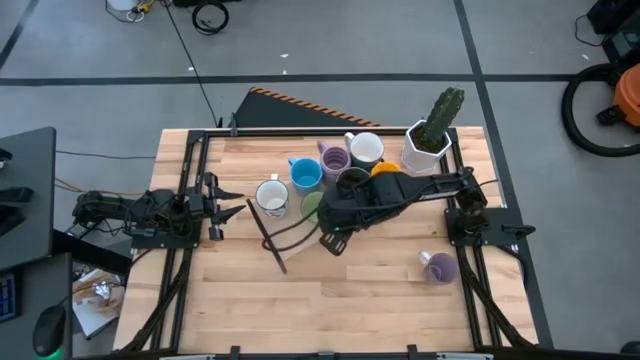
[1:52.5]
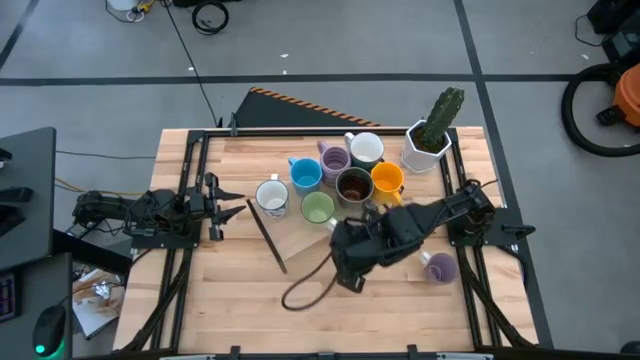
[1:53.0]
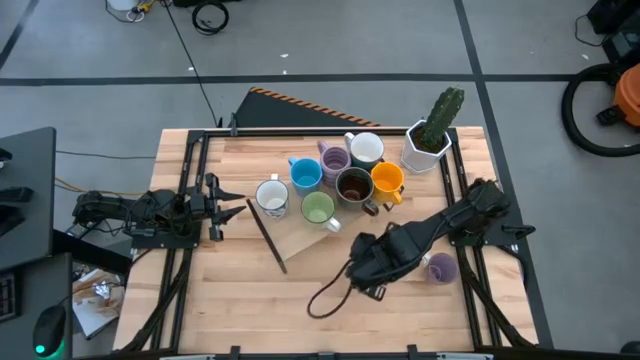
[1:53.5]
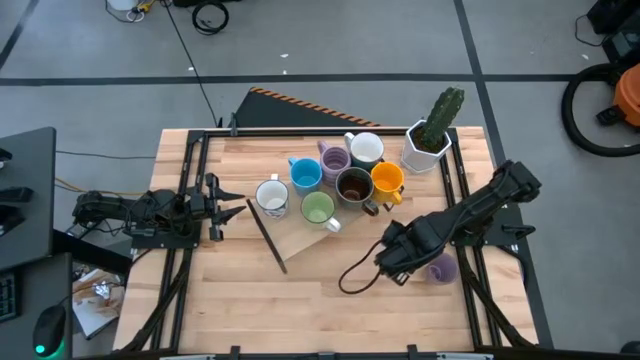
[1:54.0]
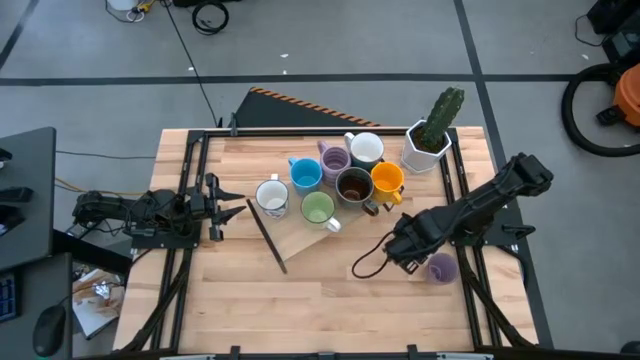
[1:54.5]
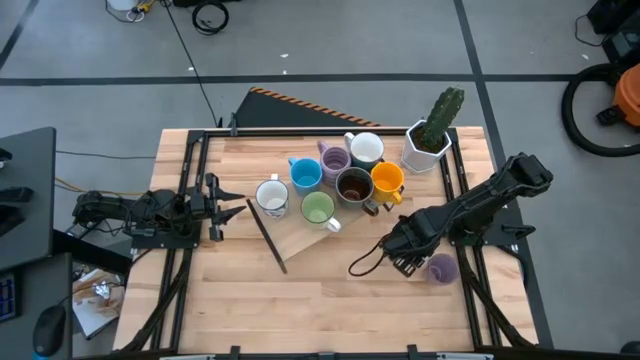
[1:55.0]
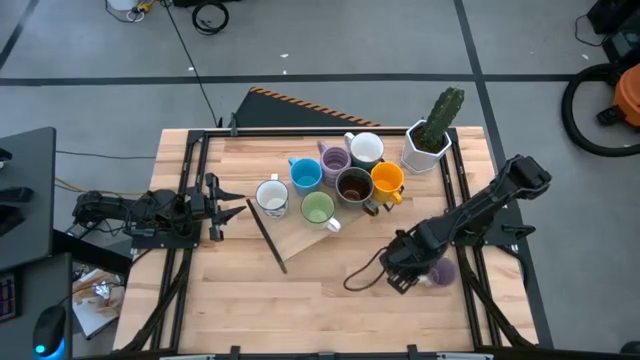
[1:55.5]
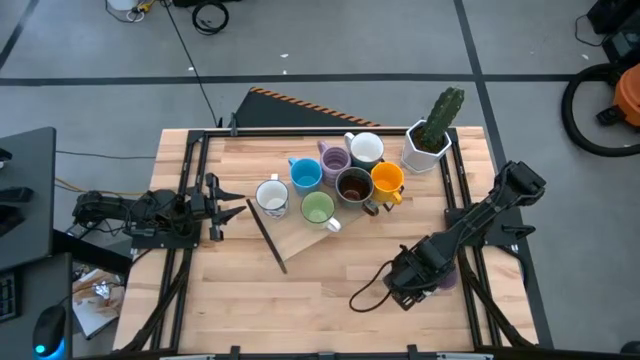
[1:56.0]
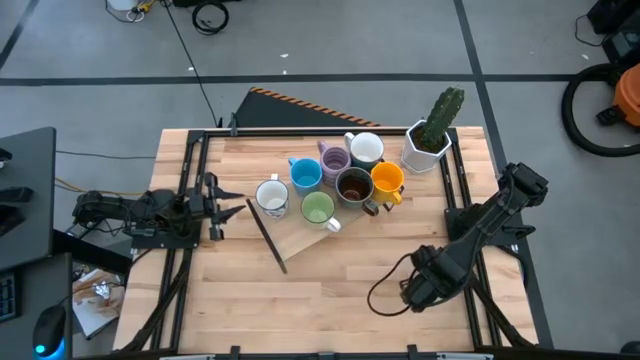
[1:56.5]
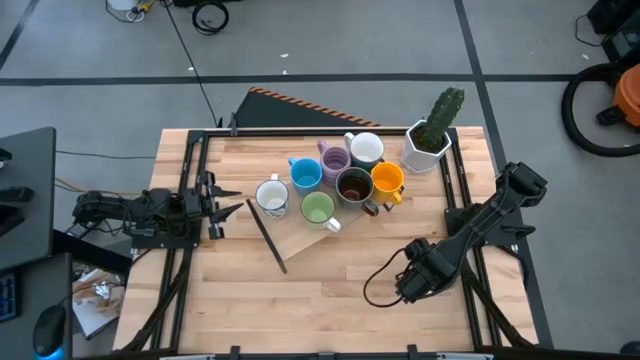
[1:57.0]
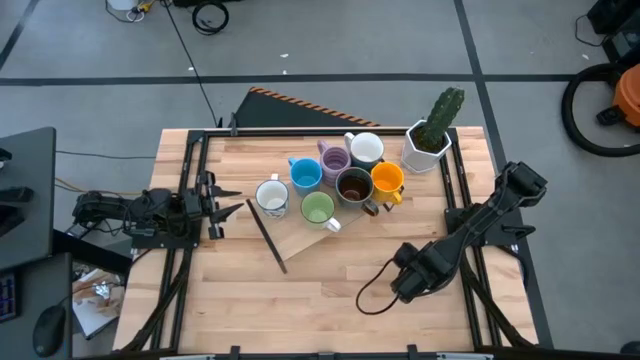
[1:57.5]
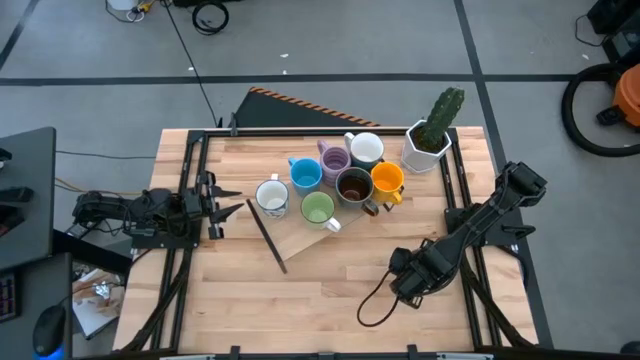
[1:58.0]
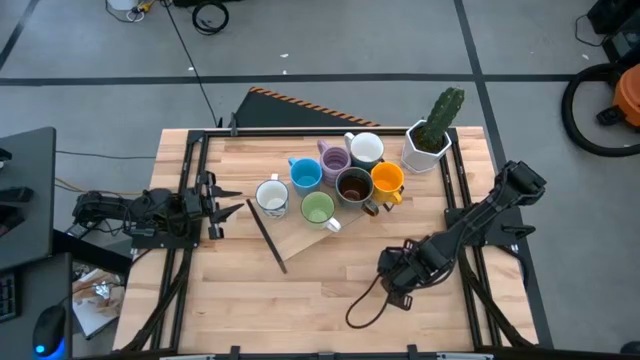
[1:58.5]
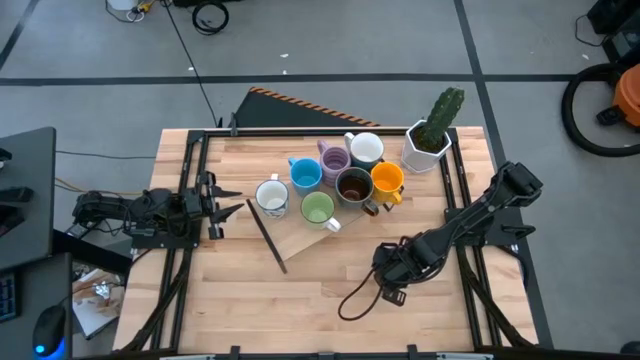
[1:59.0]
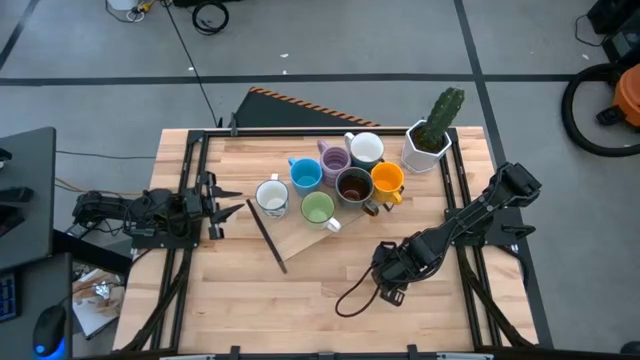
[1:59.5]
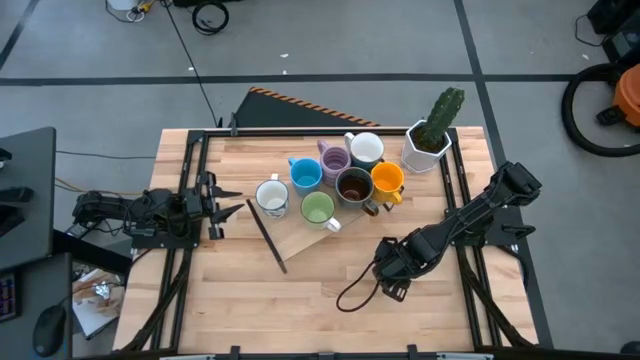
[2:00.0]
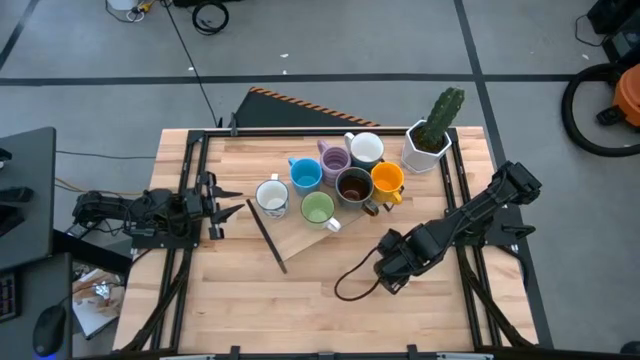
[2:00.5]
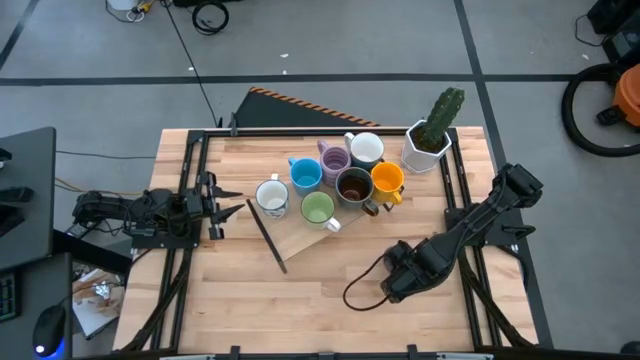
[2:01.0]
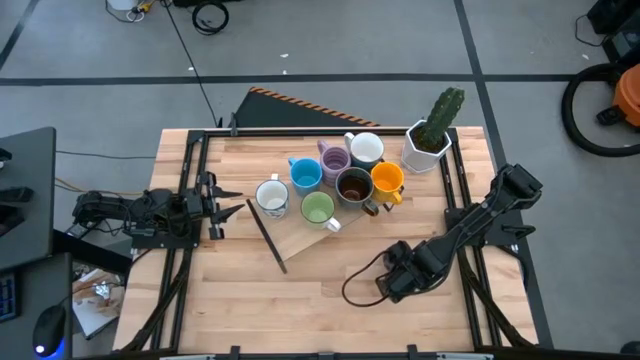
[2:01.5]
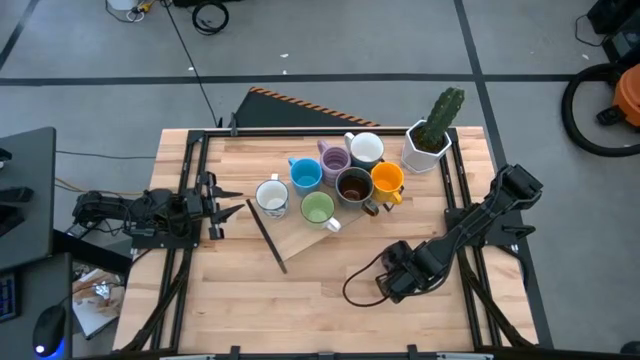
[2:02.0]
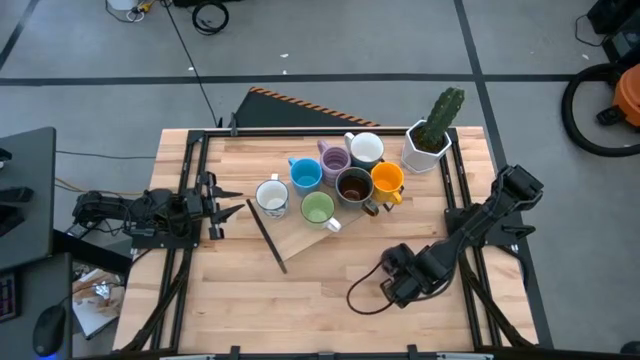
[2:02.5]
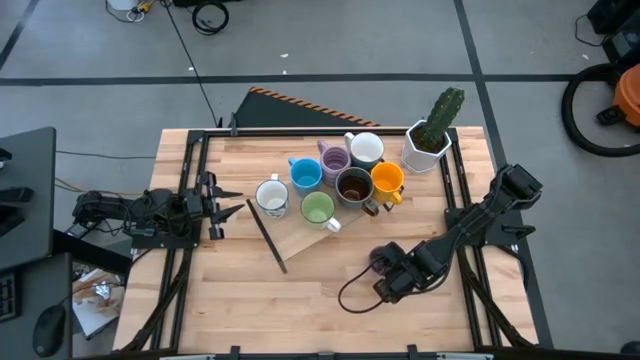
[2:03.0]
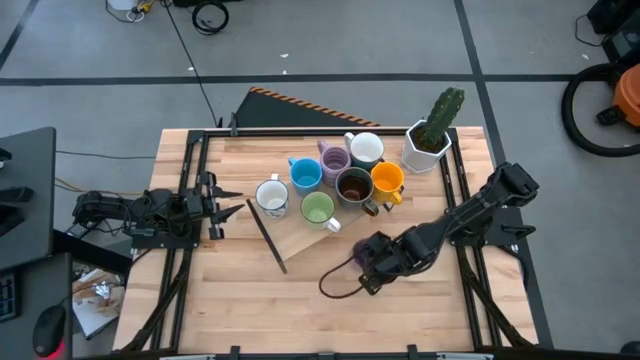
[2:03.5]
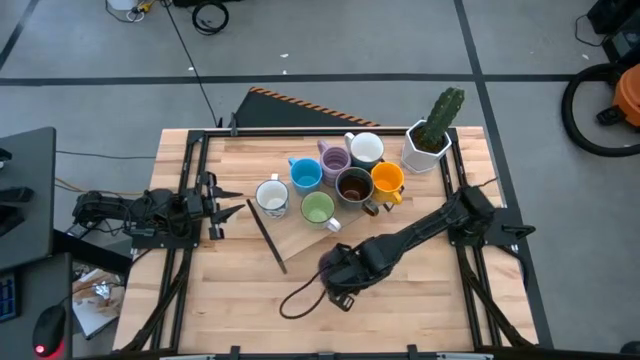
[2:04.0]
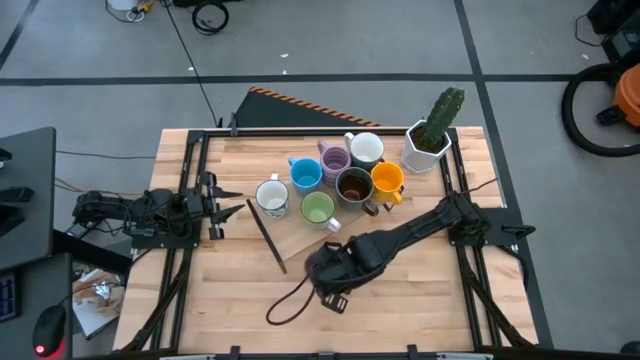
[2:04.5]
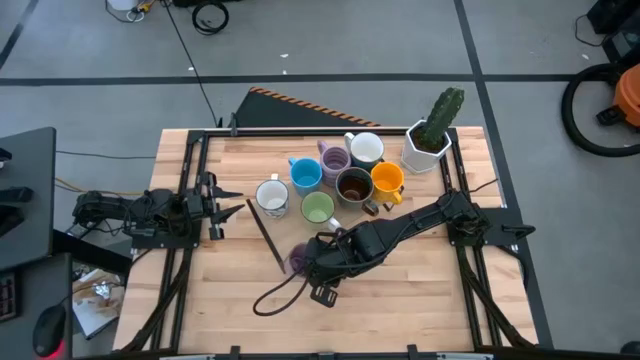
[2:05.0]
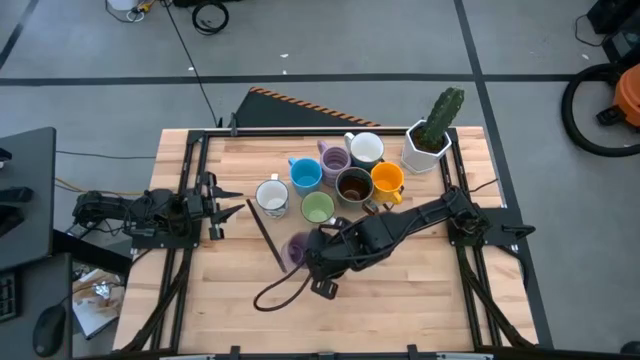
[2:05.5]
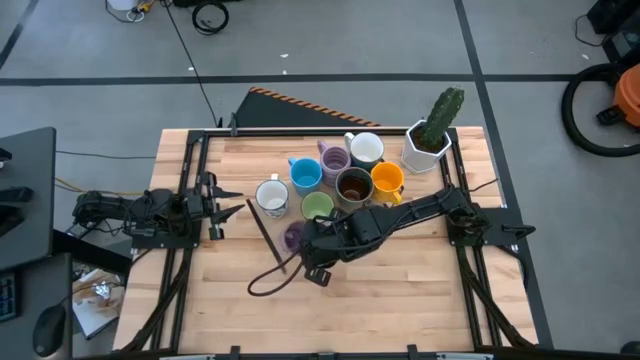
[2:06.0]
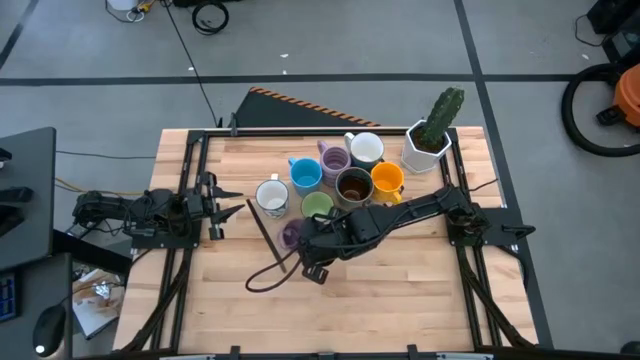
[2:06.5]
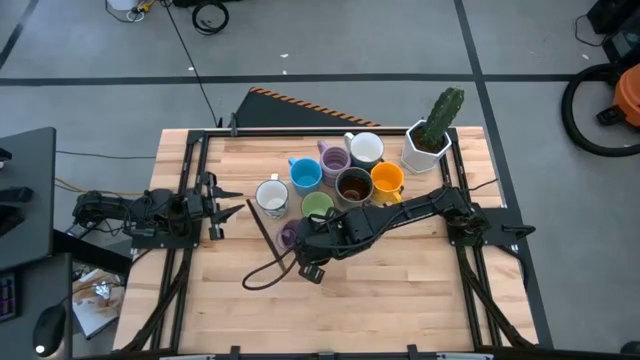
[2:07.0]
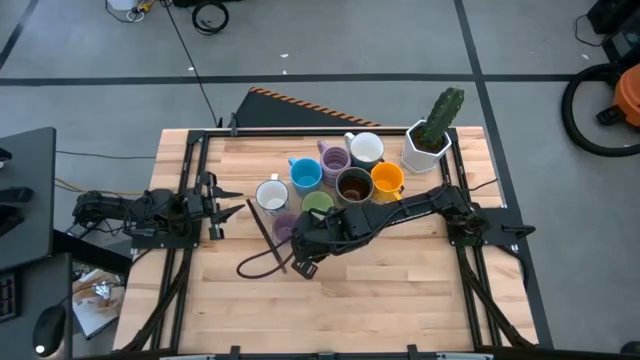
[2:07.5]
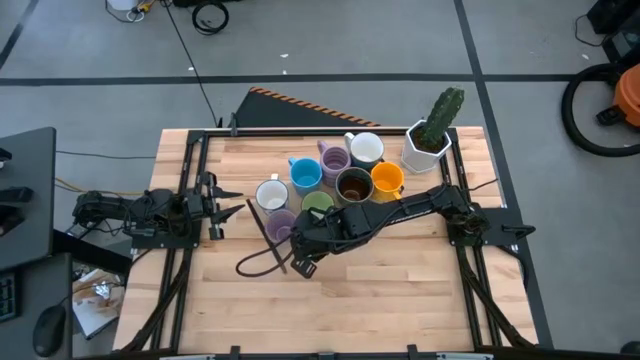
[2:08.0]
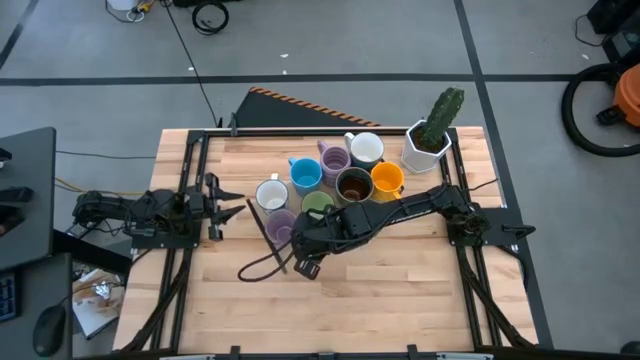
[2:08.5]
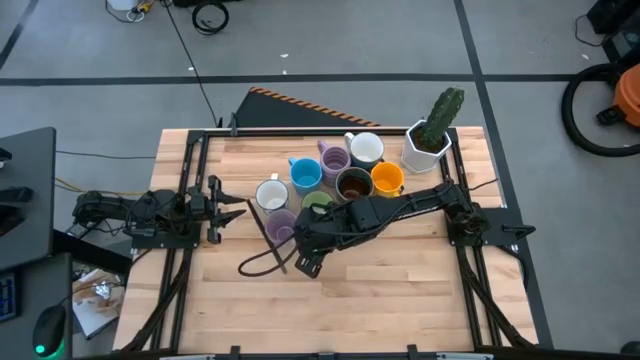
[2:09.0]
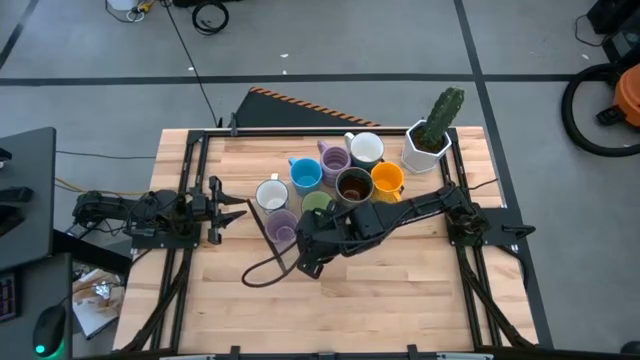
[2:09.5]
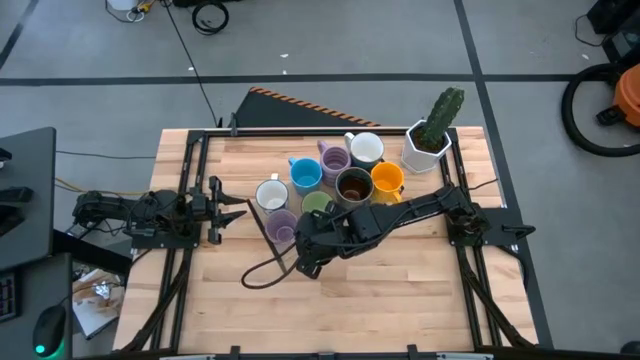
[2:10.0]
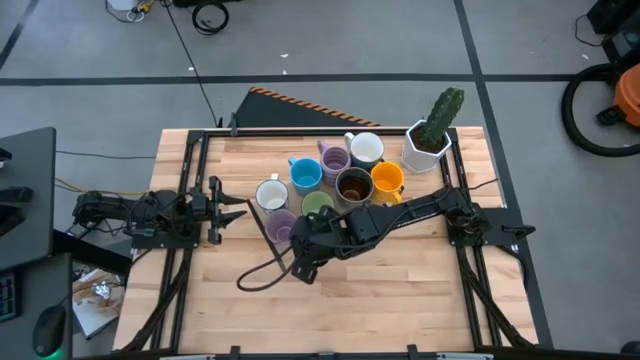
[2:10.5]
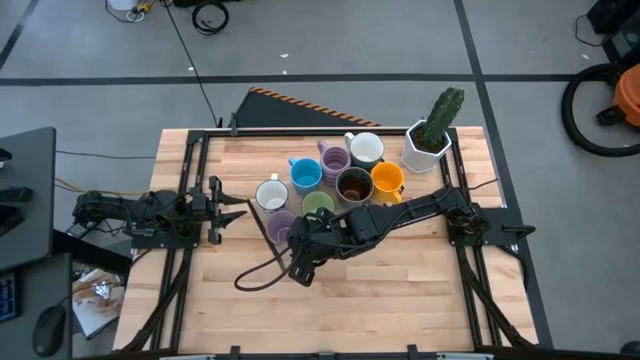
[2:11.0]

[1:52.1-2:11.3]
Task: Place coffee mugs
Put the purple patterned mug on the shelf

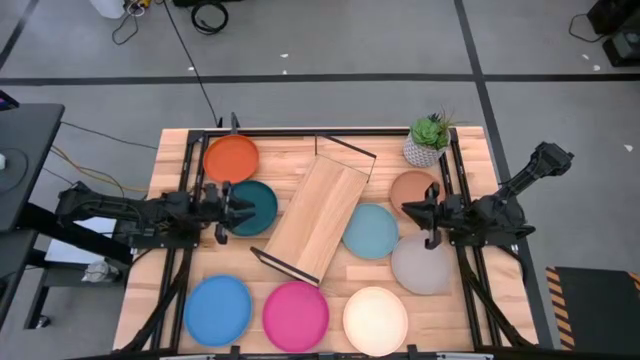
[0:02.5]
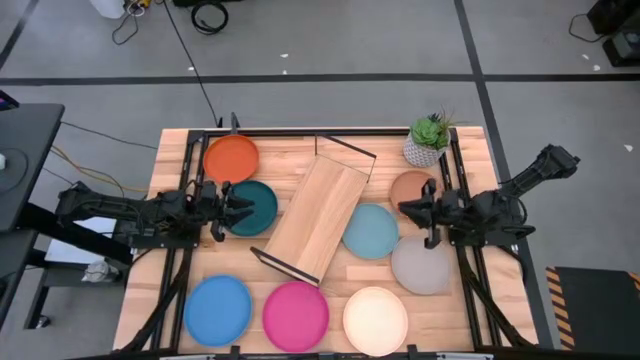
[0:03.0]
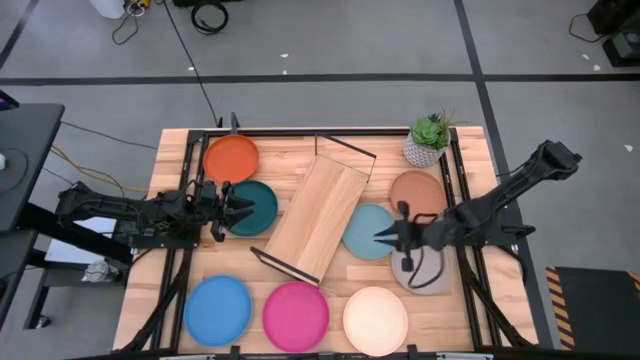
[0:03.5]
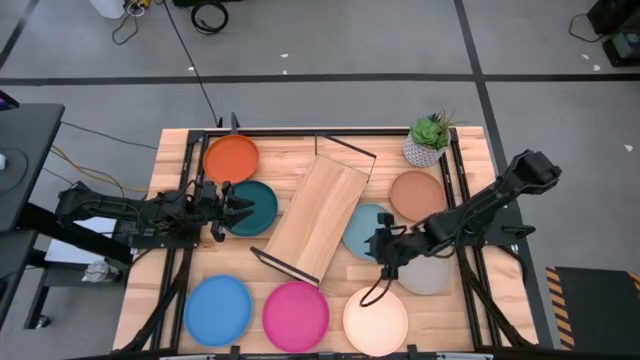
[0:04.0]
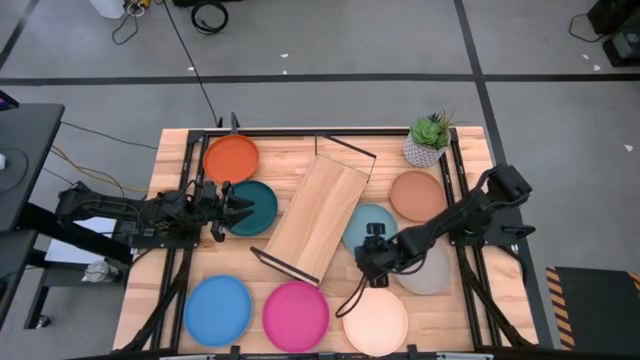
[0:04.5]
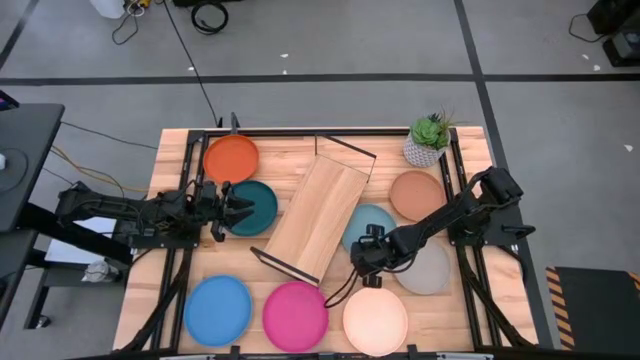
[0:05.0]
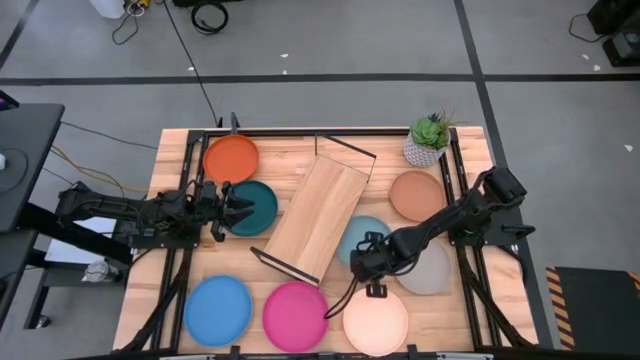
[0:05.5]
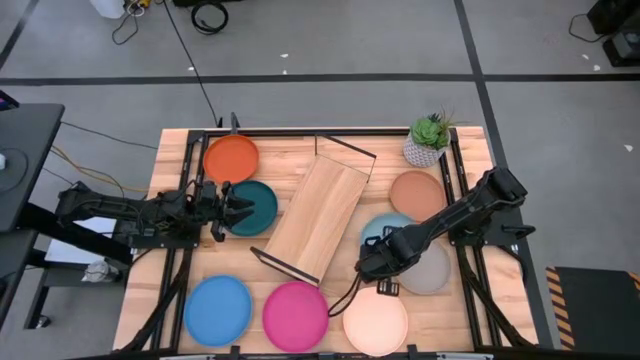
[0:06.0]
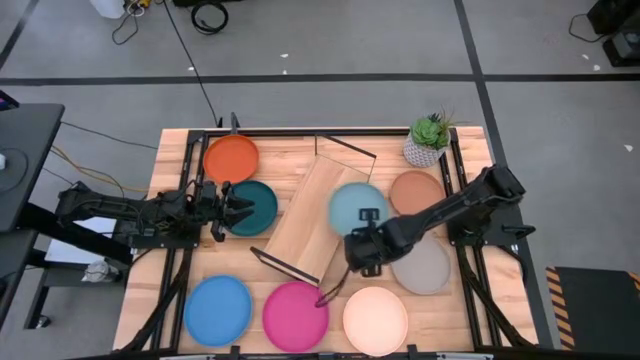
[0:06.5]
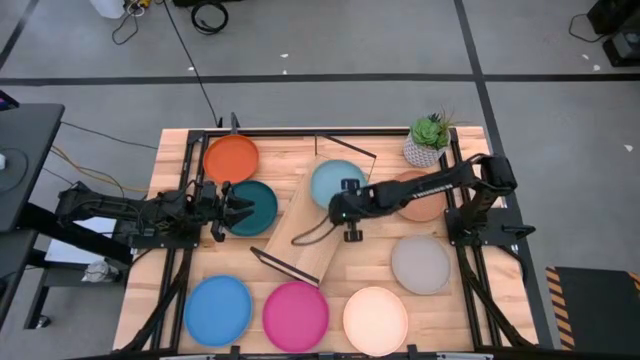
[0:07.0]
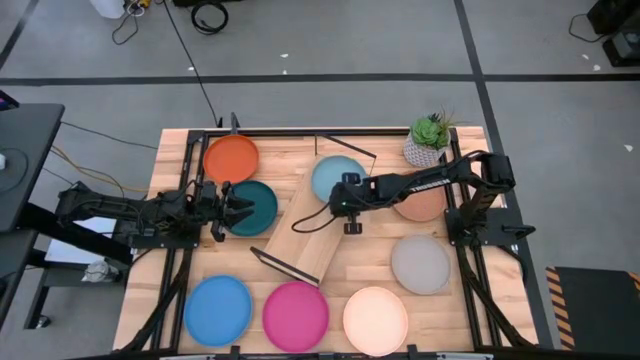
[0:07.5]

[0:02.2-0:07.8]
Task: Place and stack plates onto a shelf
Put the light blue plate on the shelf
